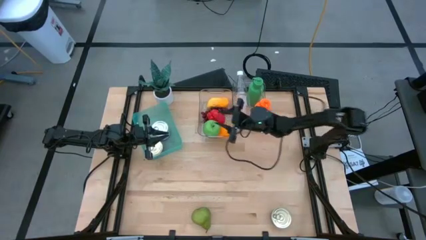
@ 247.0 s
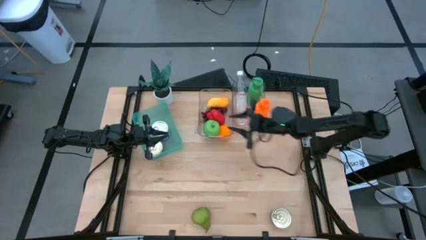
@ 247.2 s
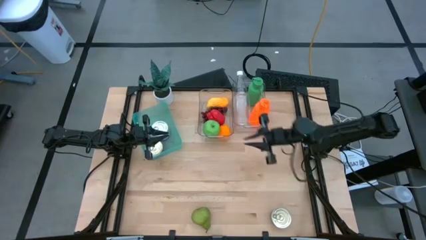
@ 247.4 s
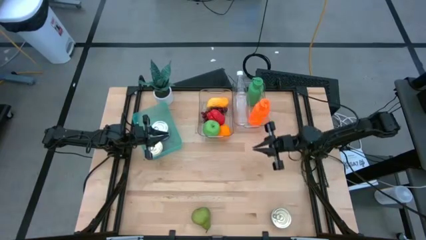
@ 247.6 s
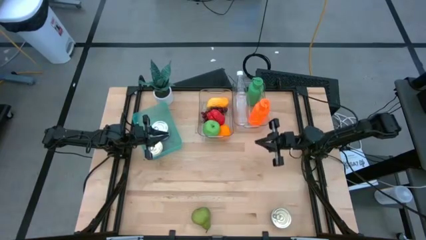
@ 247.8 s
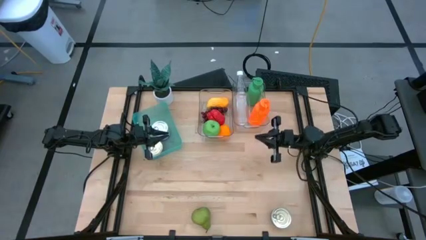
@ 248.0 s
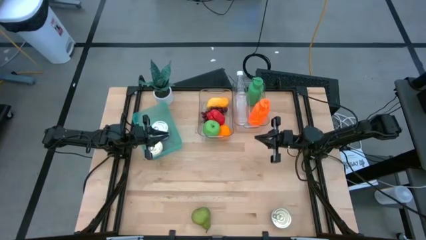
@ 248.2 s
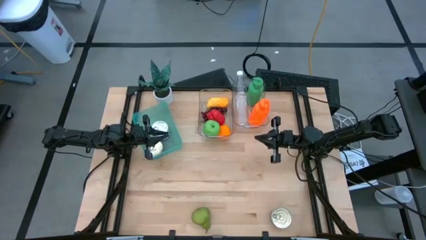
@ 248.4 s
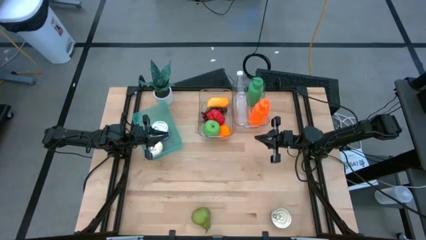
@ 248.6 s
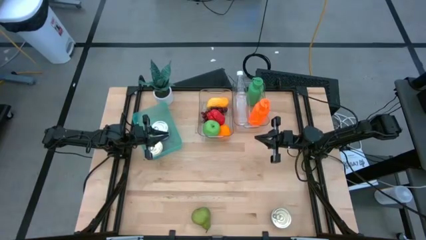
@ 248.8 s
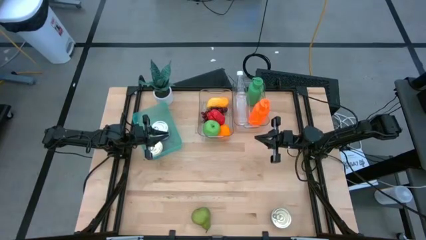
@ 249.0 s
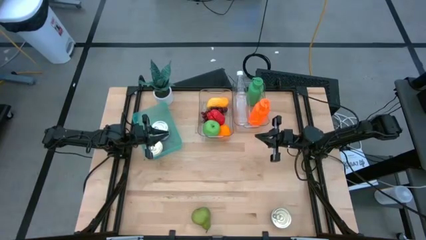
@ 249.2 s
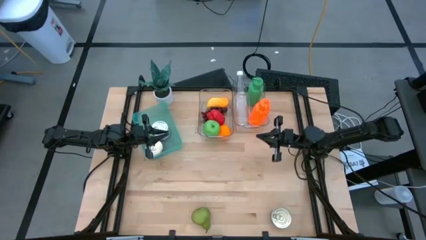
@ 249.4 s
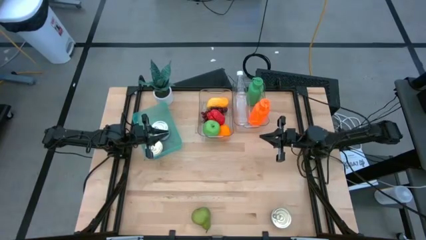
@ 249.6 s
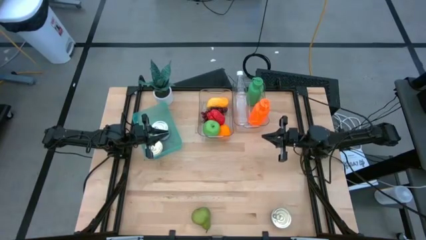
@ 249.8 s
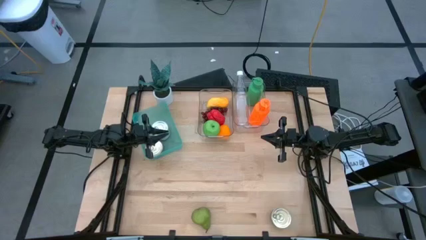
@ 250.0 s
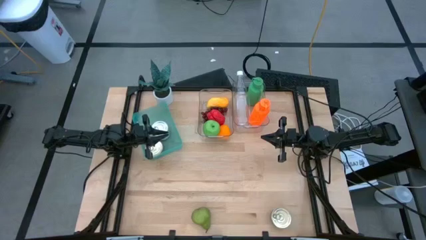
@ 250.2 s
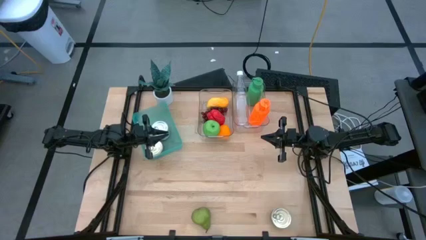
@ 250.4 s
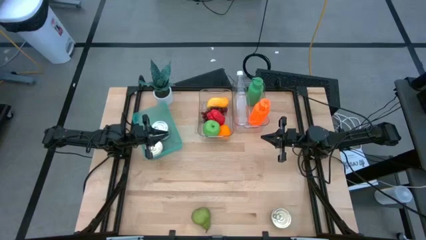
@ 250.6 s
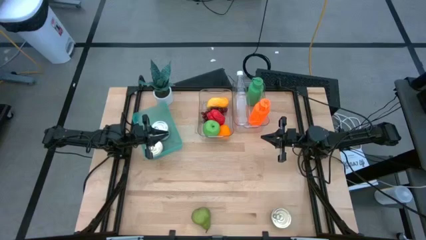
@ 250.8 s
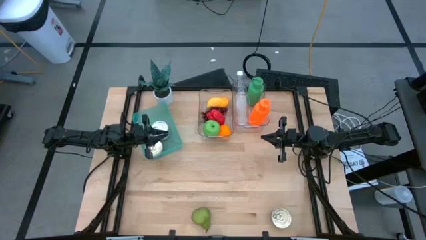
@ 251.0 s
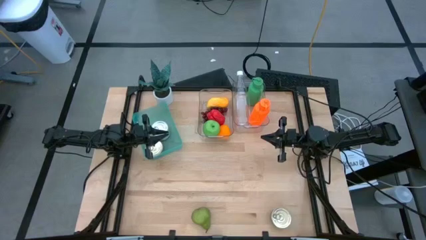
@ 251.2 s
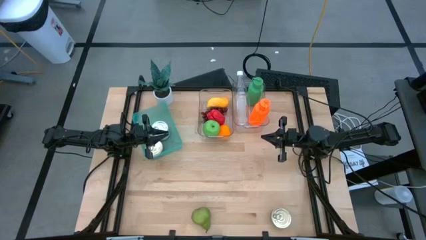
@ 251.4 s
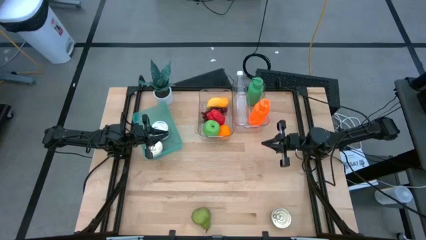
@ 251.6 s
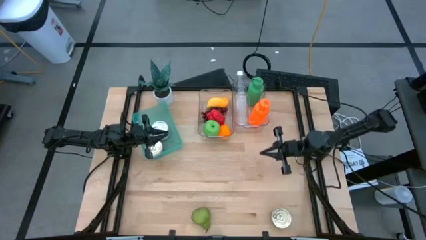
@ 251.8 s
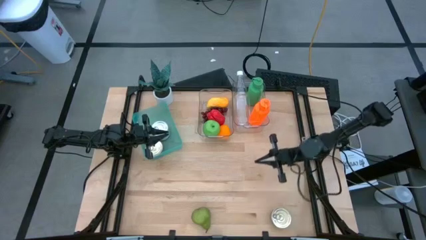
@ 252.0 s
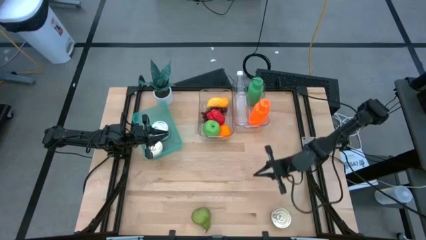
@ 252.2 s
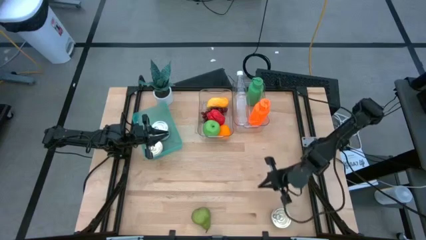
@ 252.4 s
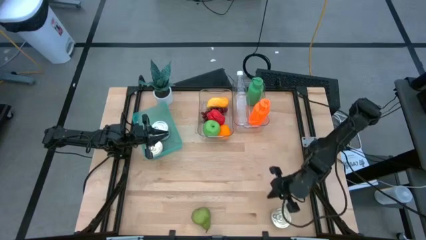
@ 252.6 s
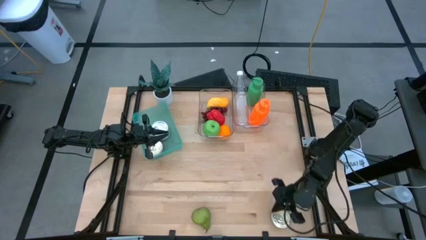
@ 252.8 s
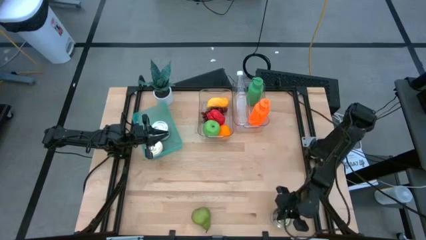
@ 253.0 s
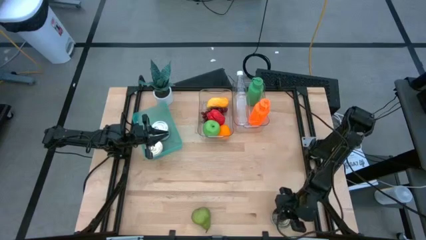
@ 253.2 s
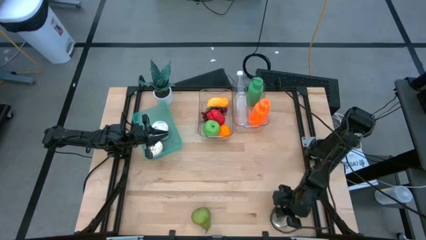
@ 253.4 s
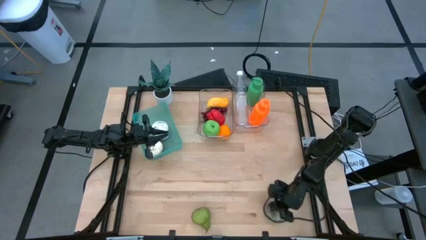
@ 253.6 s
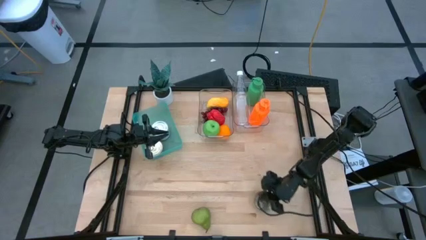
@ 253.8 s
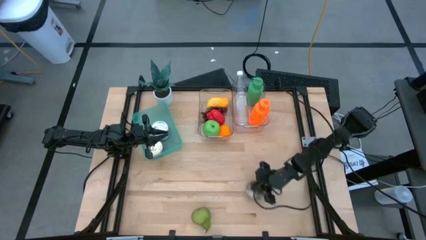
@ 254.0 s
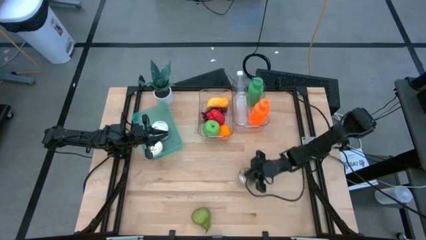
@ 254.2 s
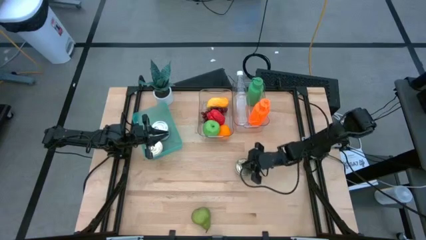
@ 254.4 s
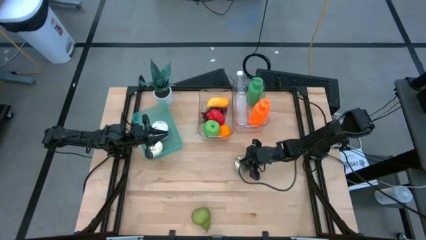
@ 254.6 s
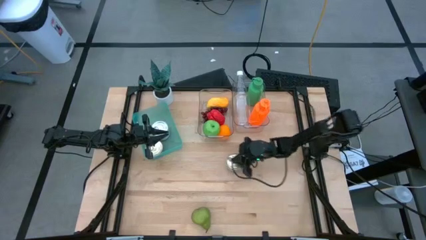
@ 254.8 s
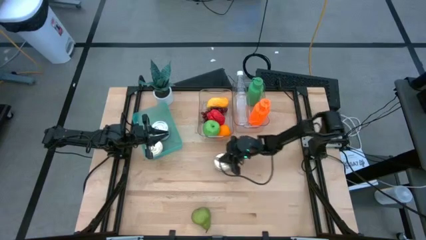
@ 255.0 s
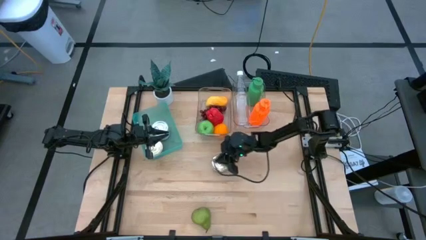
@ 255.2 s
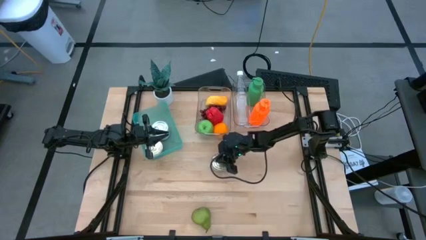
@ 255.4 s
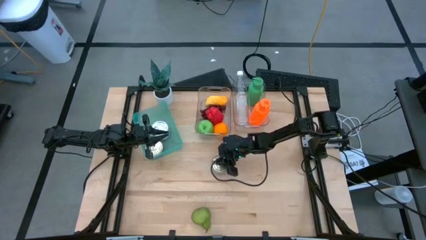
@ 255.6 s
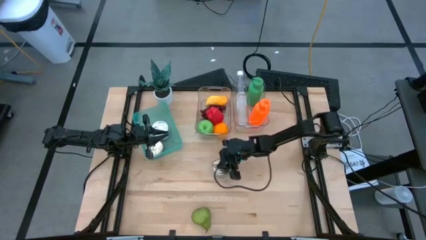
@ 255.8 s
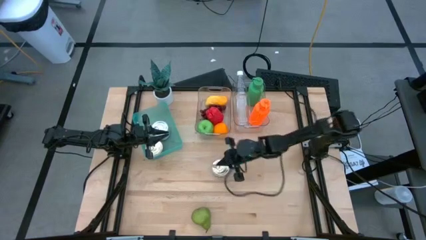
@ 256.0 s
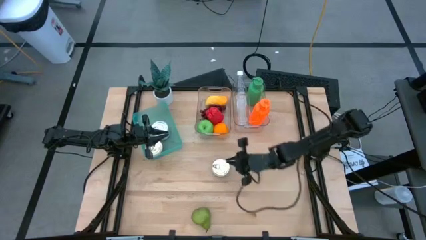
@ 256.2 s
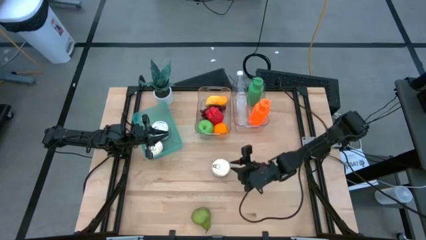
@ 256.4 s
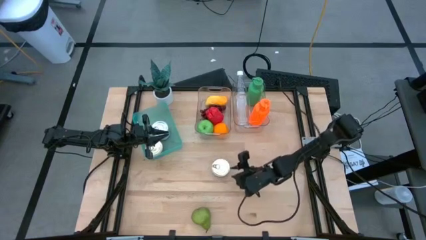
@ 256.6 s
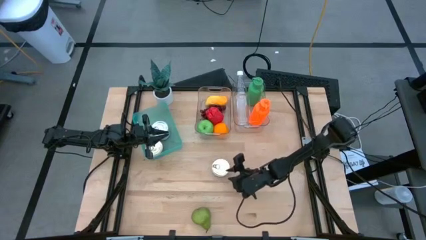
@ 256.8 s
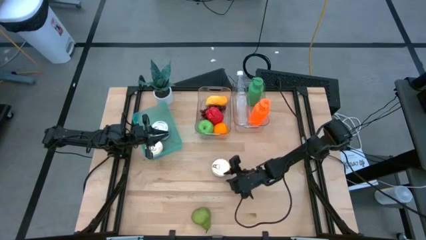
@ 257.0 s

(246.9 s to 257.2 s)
Task: Pick & Place Food Item
Stack the blue and pink tuna can on top of the blue and pink tuna can in the bin

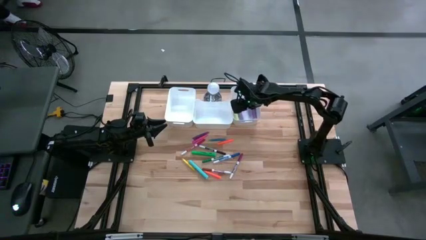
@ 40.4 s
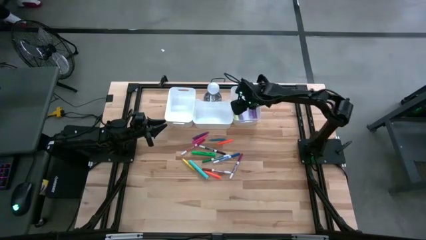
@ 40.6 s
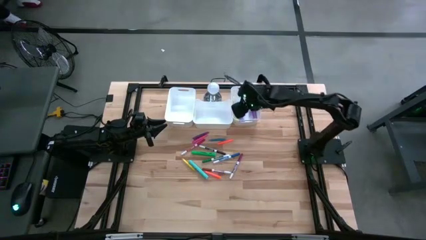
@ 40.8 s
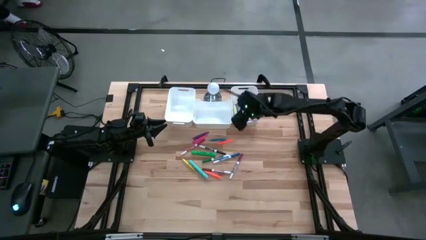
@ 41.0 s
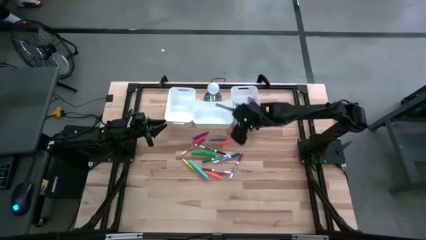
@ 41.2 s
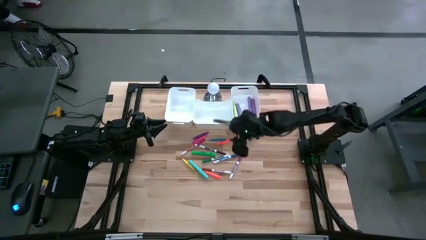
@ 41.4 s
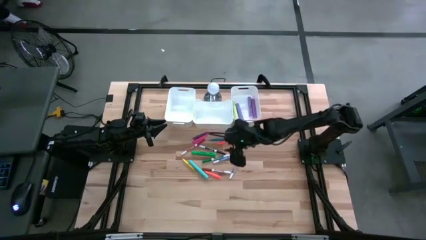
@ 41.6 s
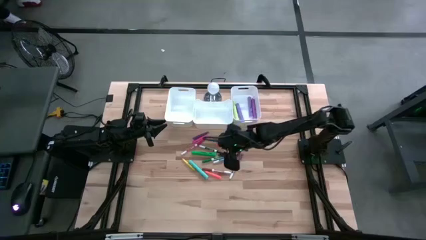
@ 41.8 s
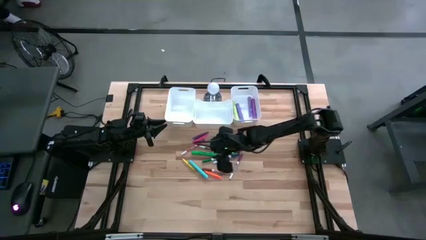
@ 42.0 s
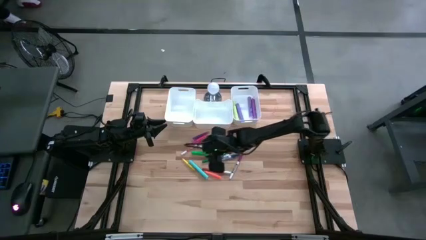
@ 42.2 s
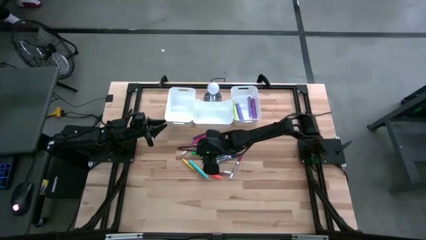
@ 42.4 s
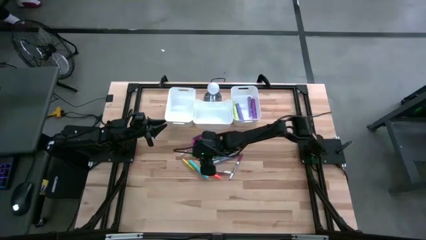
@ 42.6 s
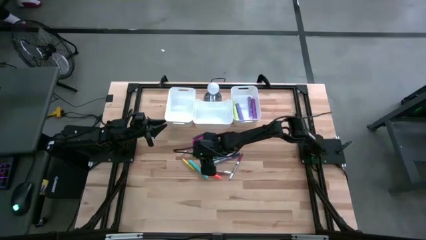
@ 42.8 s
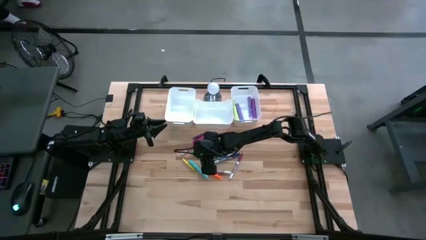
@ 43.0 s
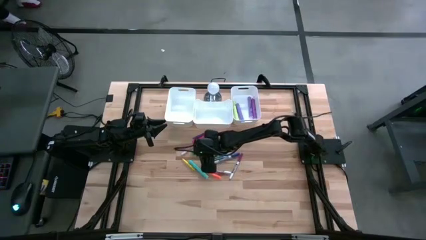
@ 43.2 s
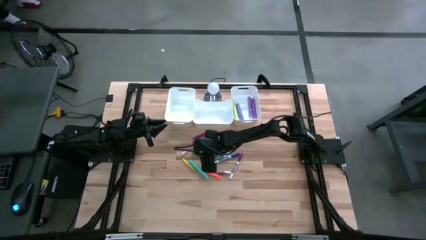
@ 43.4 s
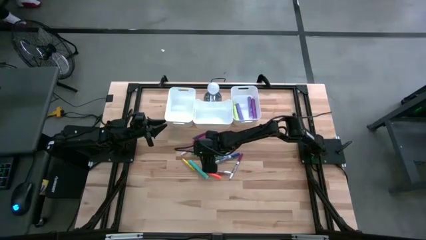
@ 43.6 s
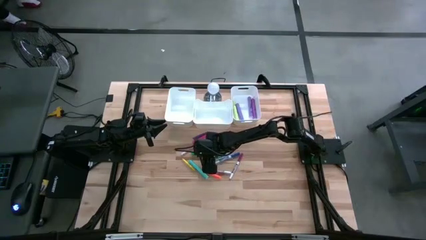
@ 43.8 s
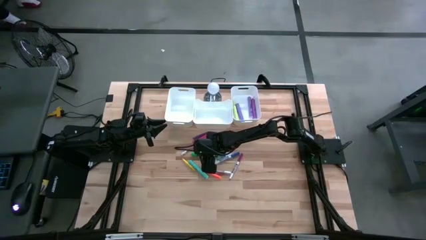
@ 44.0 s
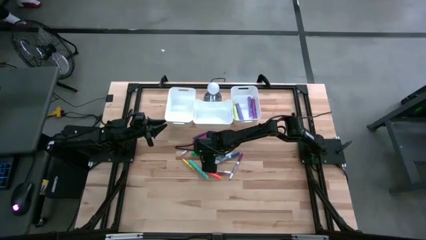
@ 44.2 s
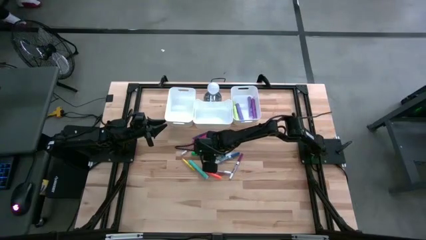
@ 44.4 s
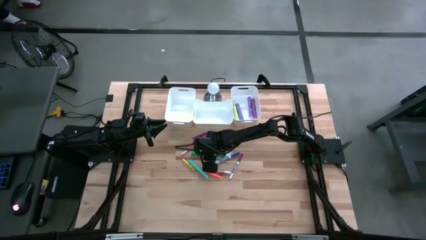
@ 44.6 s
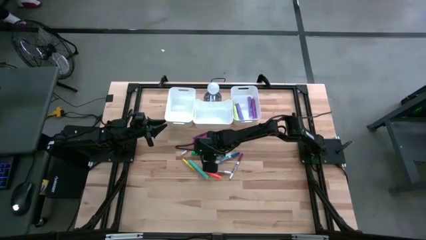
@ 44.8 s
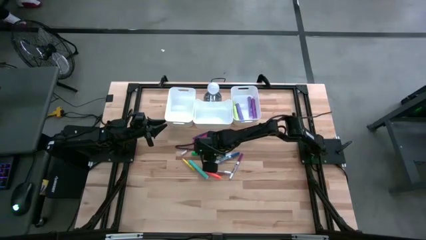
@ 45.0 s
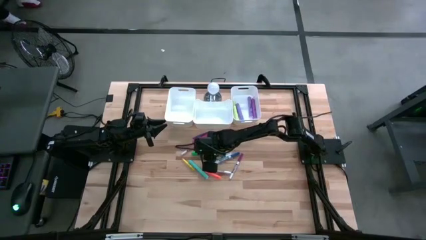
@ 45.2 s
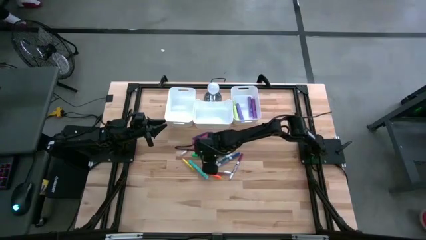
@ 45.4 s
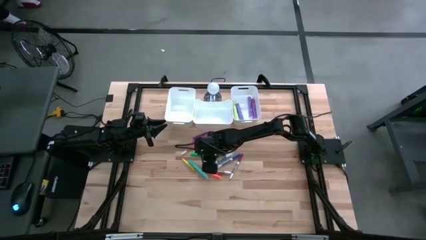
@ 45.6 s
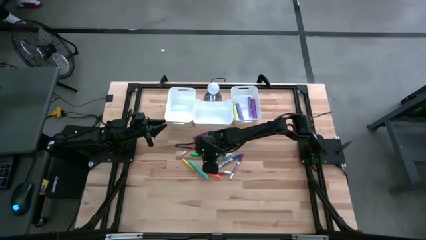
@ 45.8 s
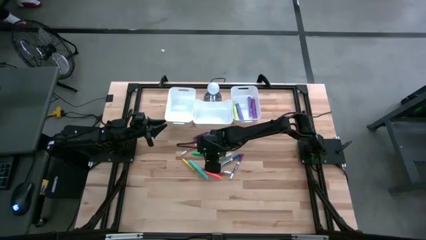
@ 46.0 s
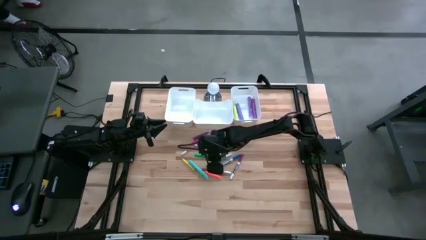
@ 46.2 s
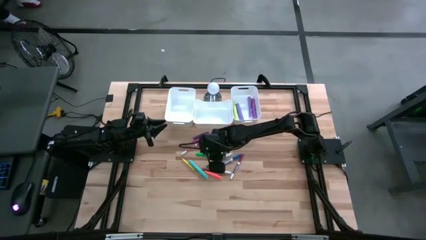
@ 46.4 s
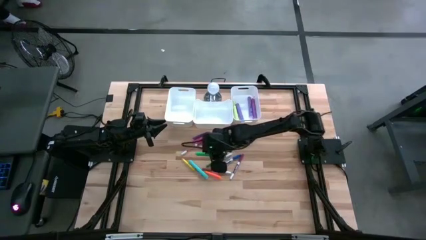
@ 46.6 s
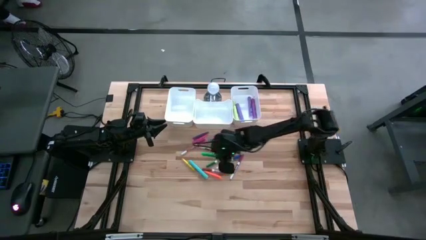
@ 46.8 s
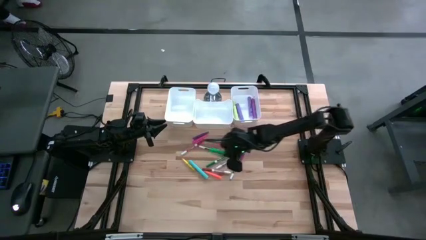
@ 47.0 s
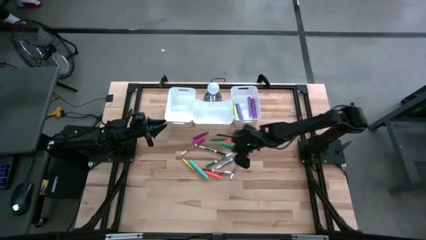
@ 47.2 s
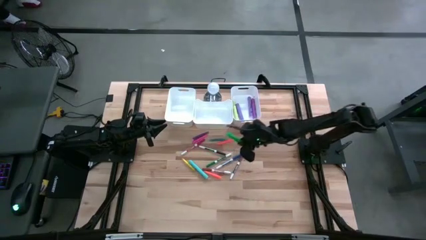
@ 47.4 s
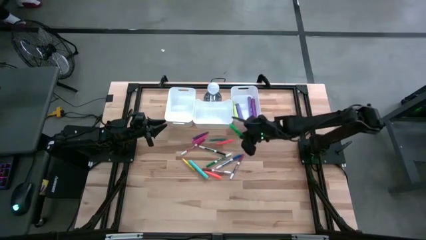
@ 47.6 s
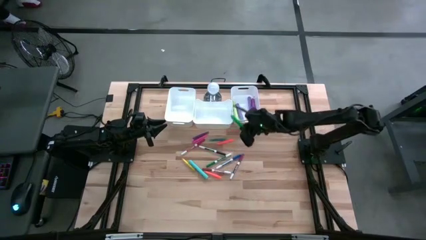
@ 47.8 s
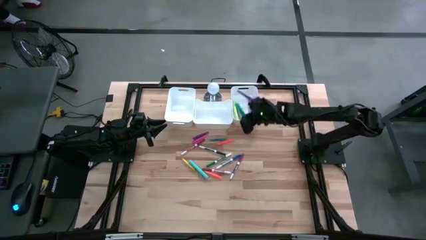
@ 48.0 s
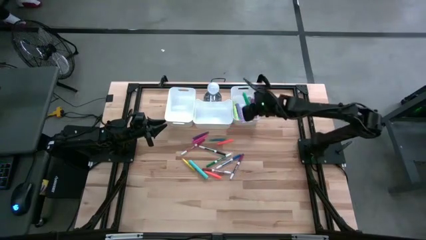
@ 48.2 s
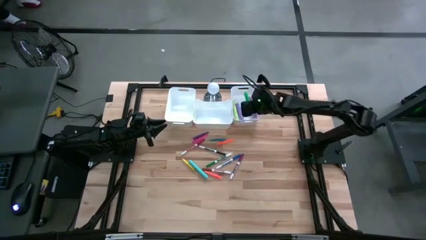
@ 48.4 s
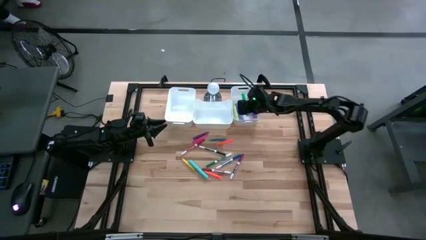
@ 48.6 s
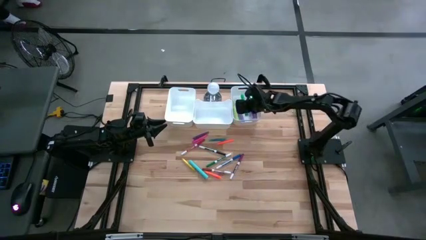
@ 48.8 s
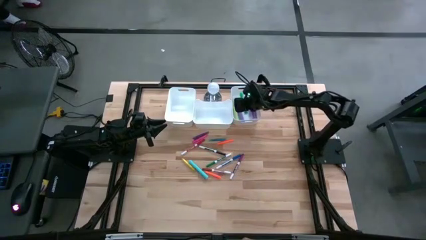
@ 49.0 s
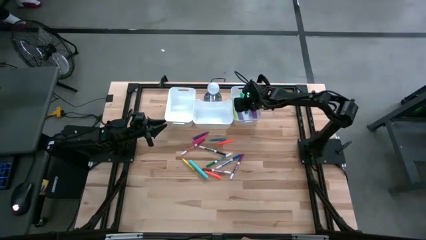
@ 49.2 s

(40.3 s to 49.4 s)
Task: Pick & Place Markers
Put the green highlighter pen into the right white bin
